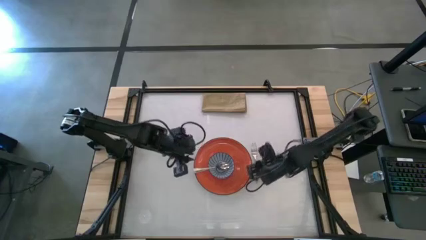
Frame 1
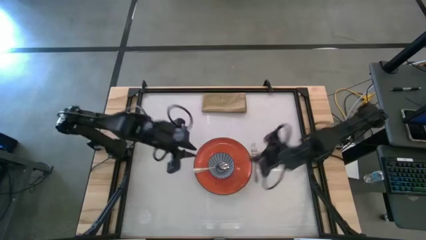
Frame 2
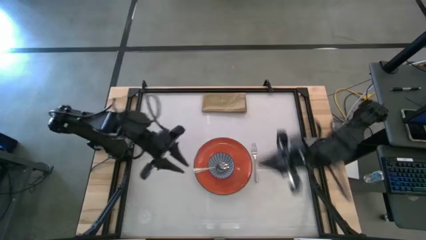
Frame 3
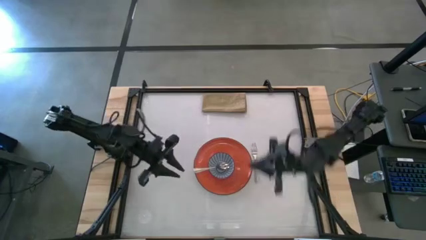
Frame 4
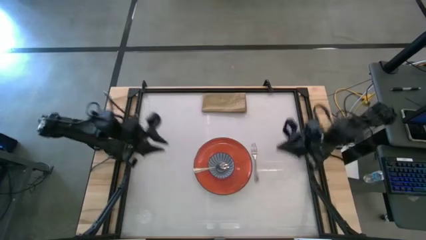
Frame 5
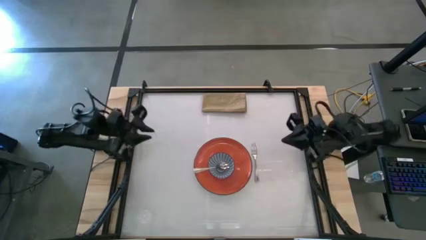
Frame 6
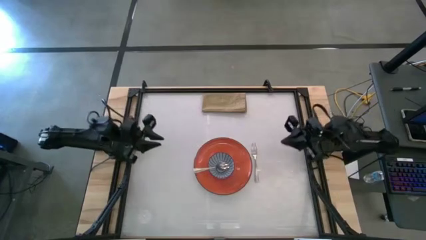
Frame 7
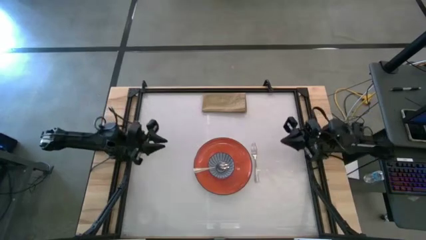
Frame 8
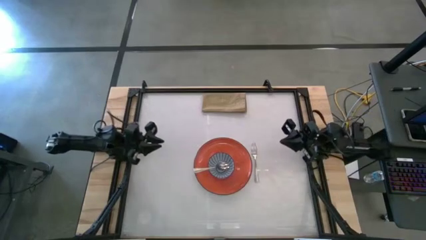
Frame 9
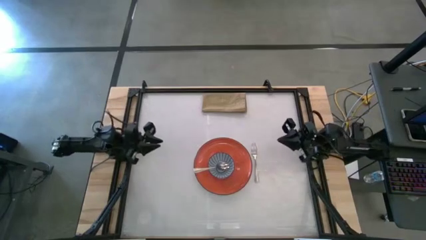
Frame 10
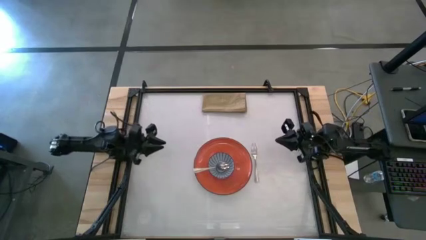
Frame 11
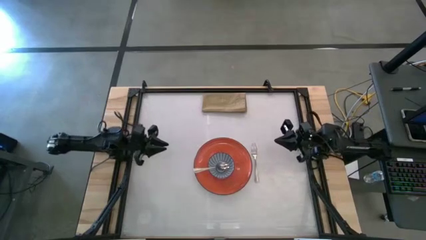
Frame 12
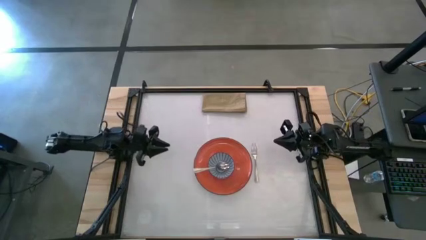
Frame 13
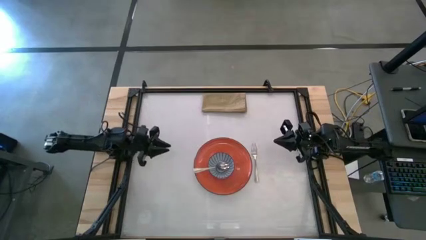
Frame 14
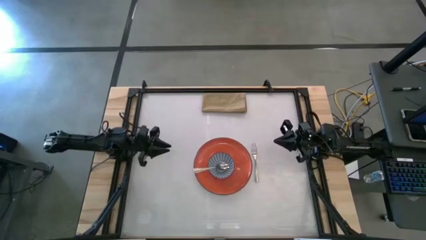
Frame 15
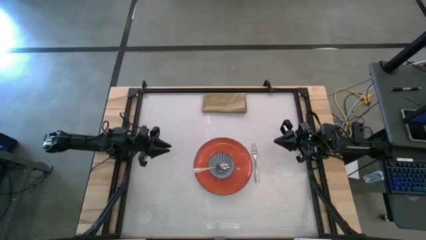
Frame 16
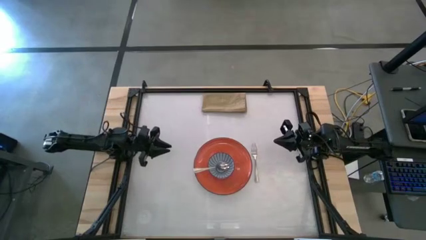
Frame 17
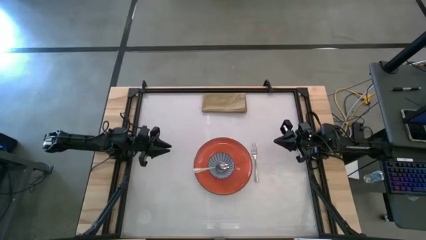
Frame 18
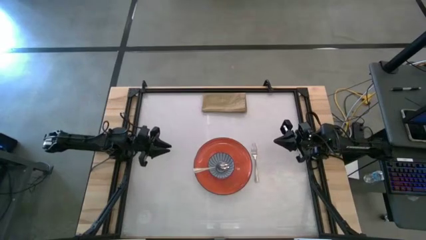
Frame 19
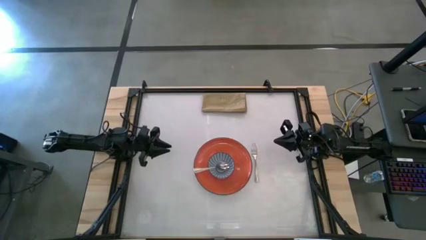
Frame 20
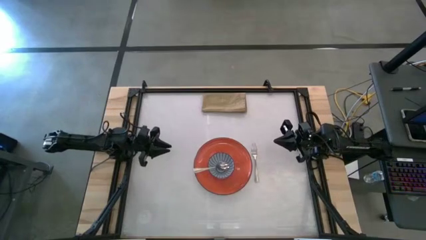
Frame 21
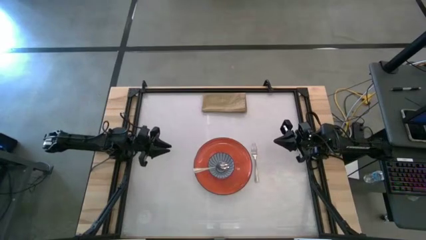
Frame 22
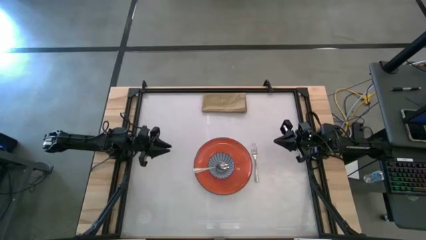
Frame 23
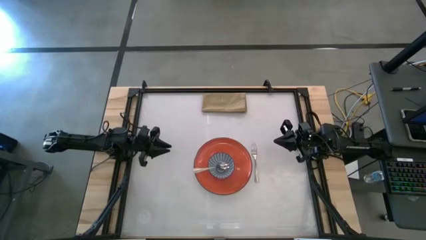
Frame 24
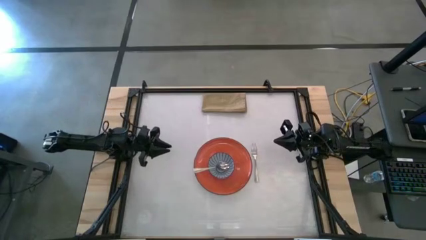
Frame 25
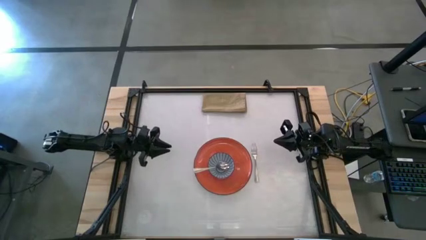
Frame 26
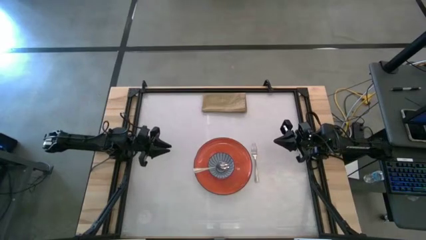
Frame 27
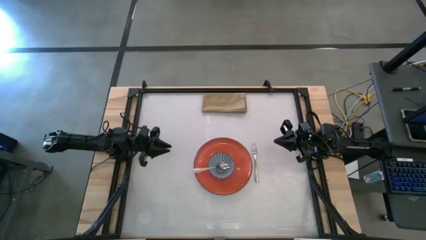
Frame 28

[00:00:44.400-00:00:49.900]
Task: Set table place
Return to Home Position

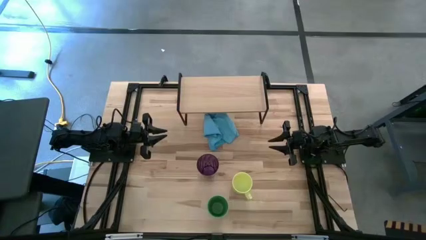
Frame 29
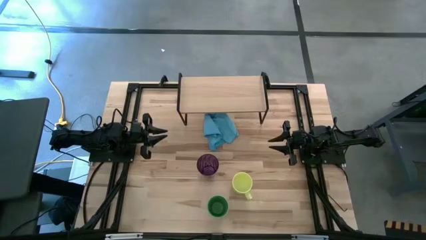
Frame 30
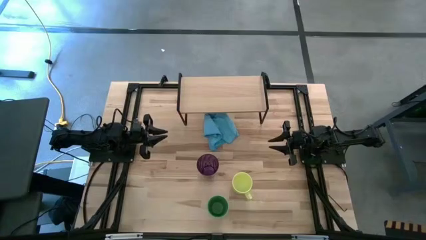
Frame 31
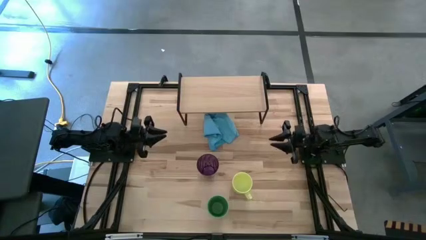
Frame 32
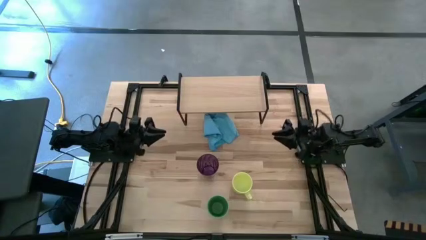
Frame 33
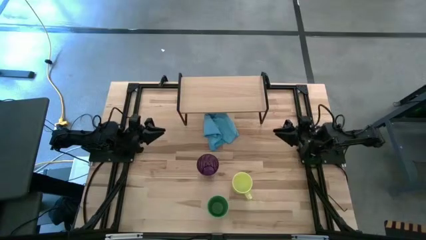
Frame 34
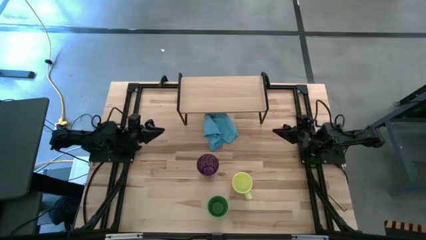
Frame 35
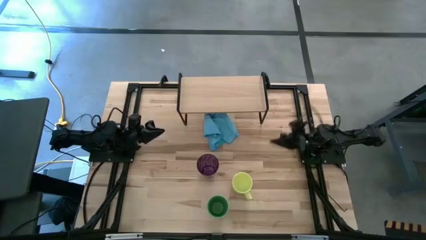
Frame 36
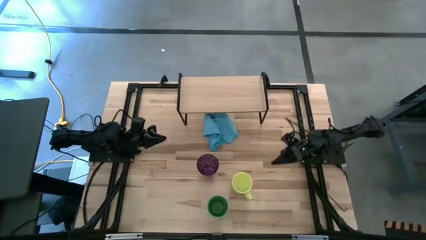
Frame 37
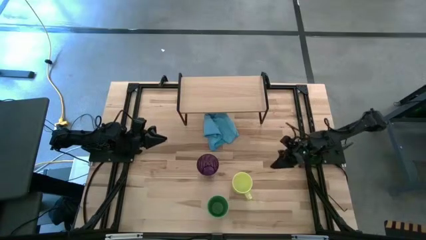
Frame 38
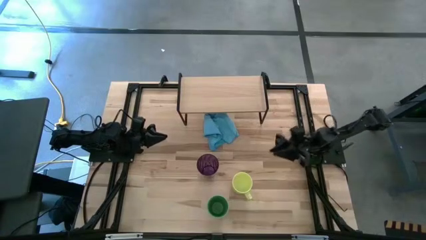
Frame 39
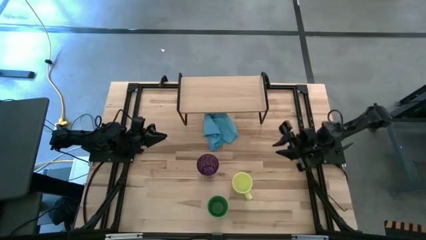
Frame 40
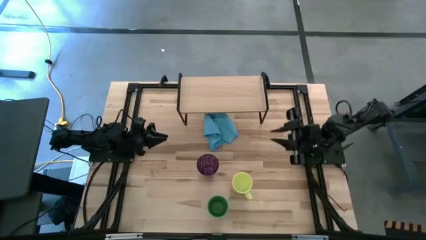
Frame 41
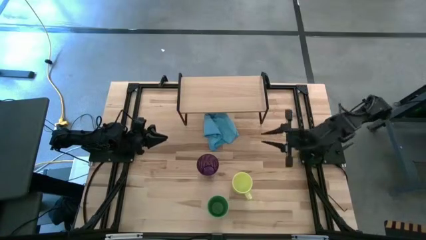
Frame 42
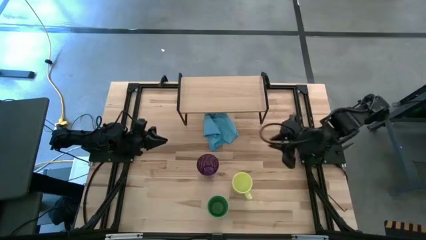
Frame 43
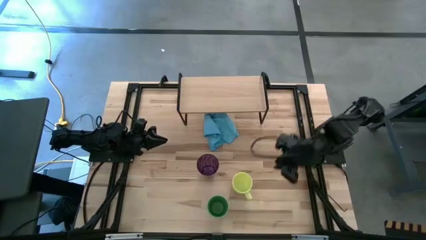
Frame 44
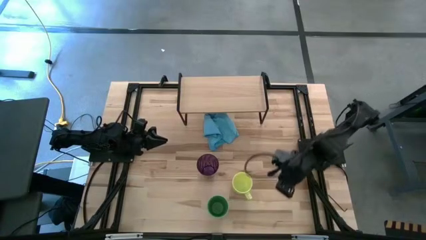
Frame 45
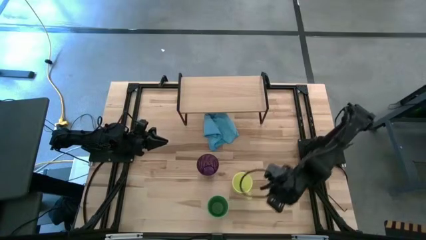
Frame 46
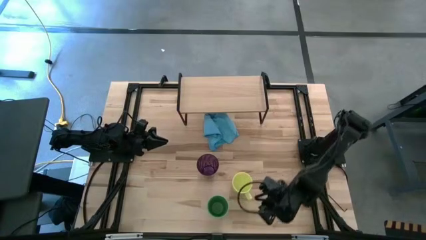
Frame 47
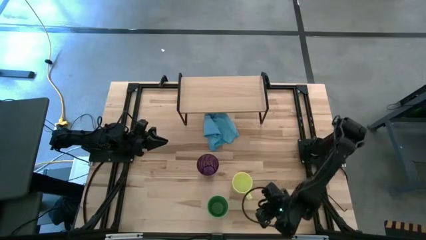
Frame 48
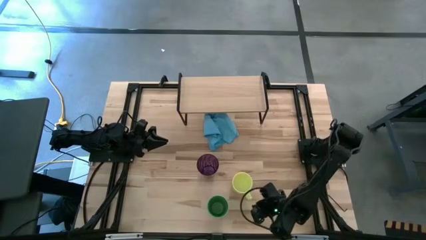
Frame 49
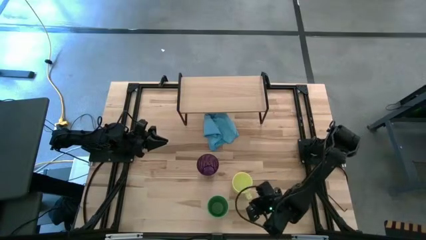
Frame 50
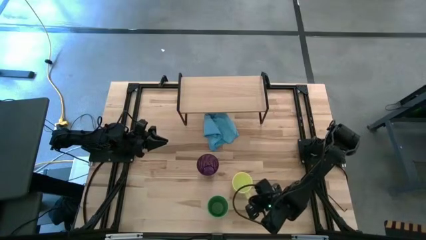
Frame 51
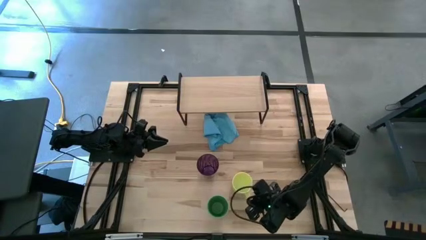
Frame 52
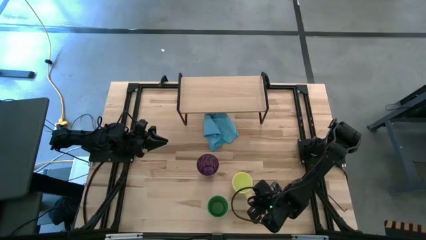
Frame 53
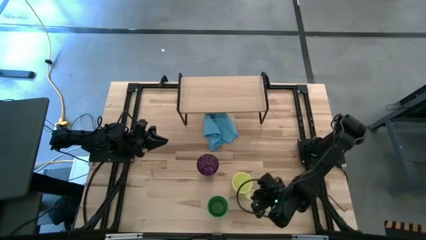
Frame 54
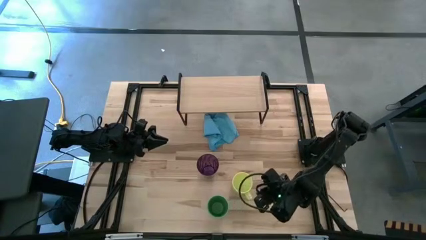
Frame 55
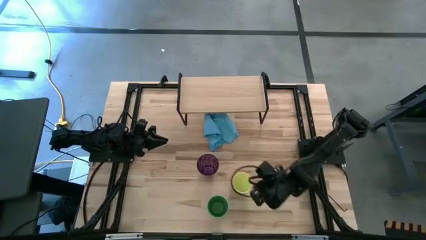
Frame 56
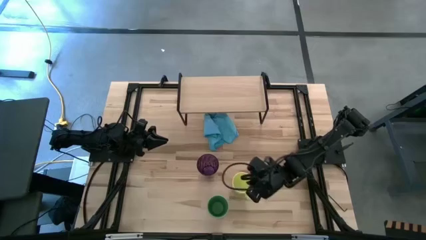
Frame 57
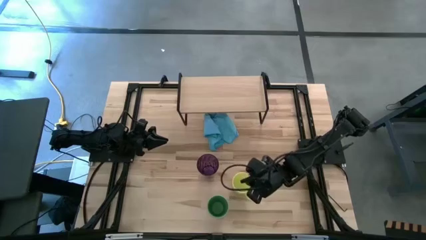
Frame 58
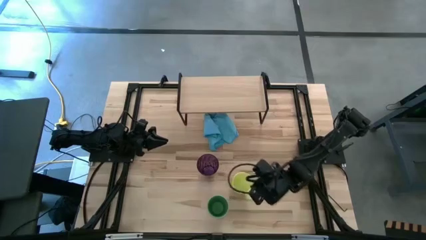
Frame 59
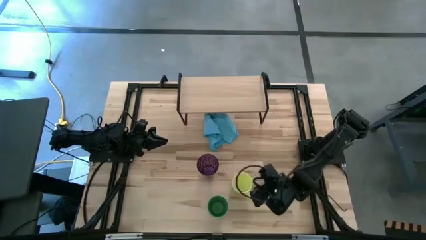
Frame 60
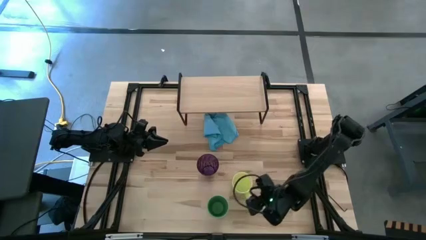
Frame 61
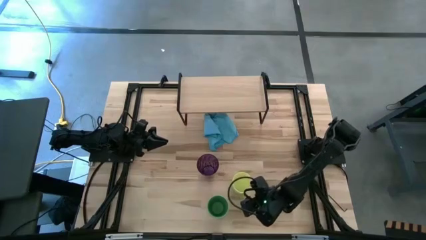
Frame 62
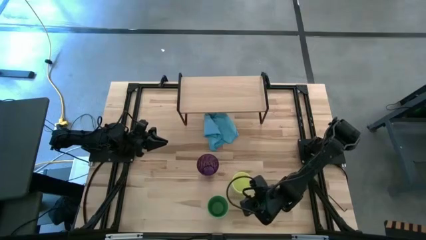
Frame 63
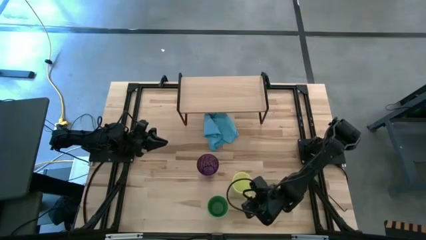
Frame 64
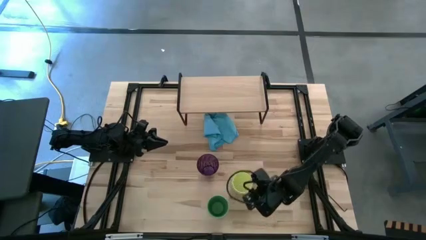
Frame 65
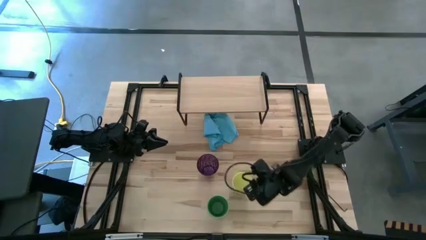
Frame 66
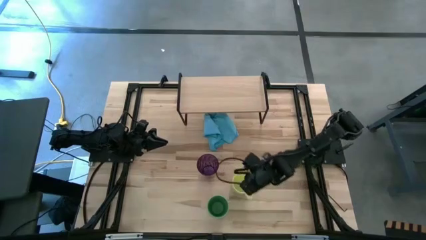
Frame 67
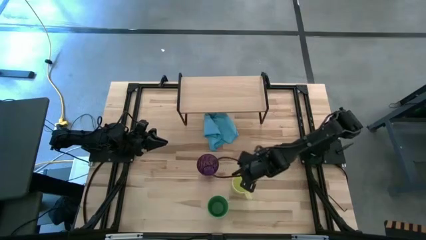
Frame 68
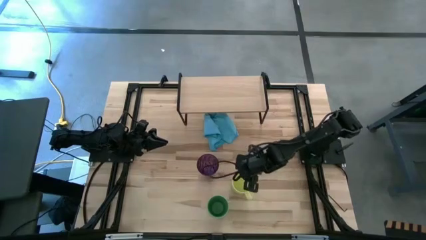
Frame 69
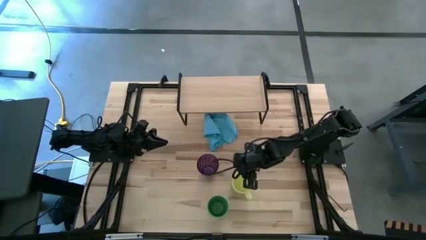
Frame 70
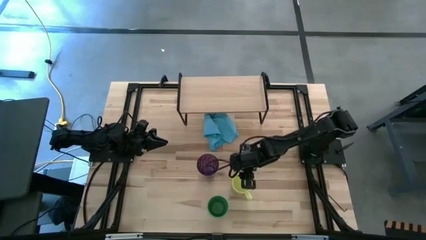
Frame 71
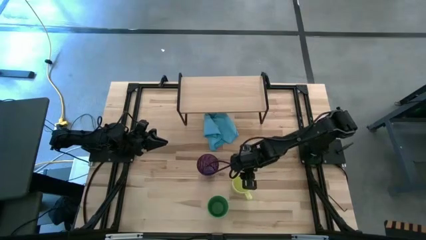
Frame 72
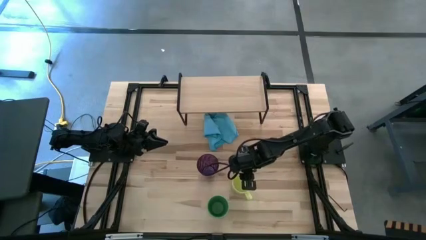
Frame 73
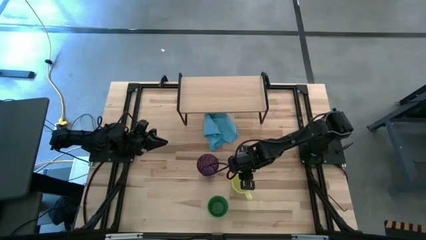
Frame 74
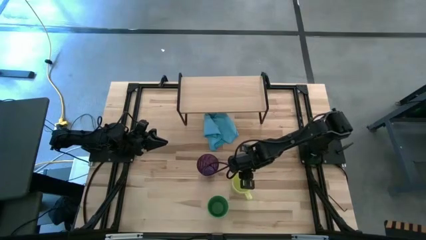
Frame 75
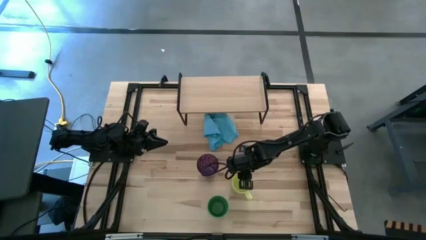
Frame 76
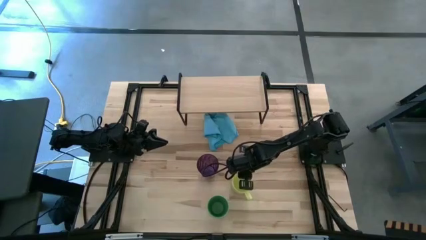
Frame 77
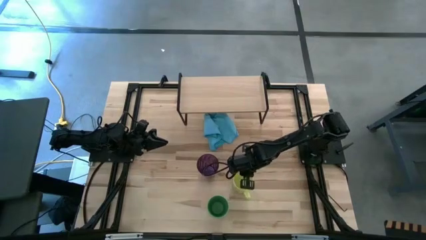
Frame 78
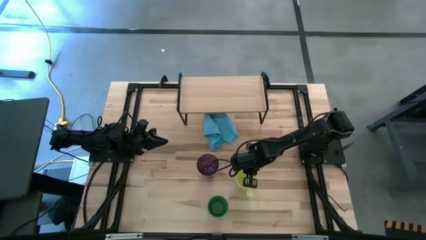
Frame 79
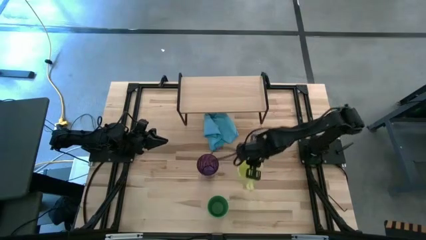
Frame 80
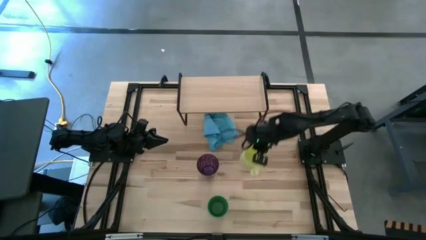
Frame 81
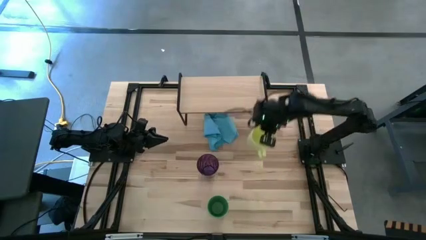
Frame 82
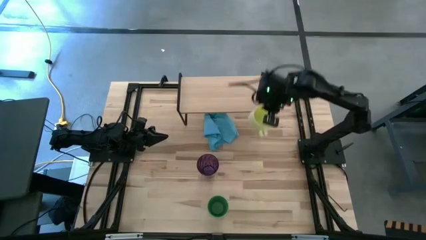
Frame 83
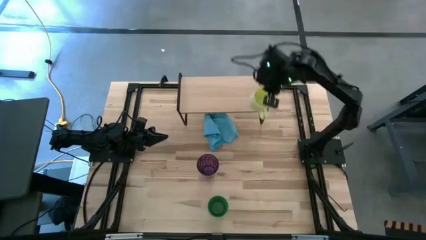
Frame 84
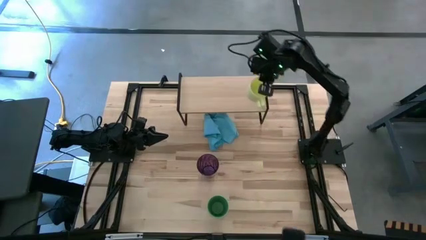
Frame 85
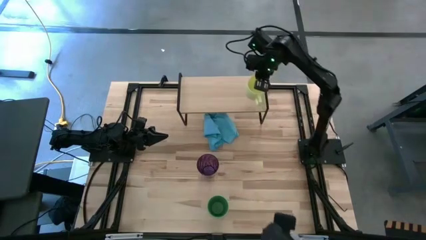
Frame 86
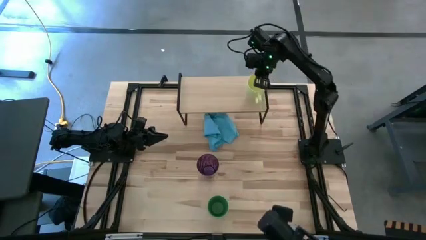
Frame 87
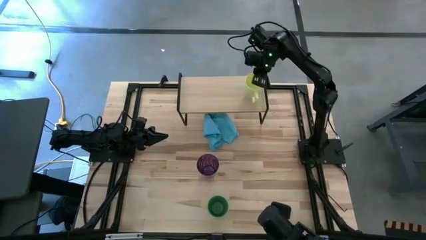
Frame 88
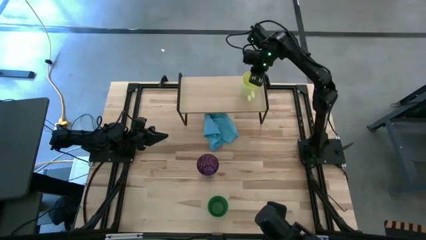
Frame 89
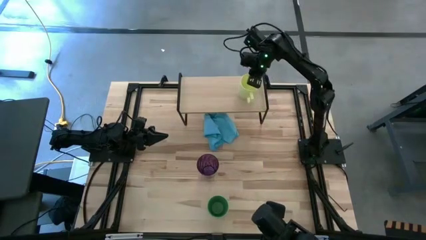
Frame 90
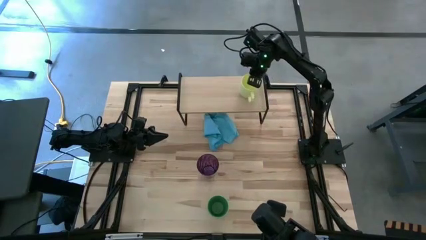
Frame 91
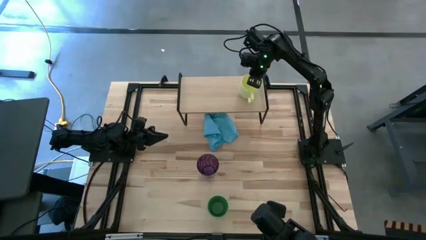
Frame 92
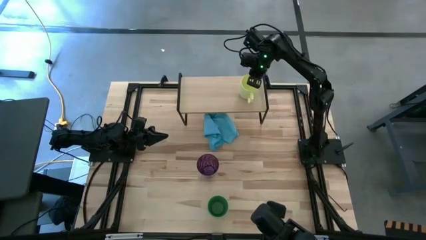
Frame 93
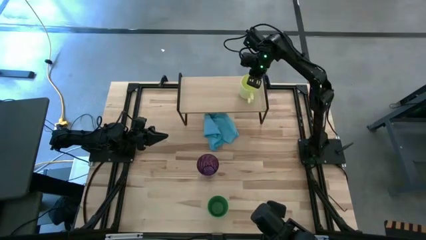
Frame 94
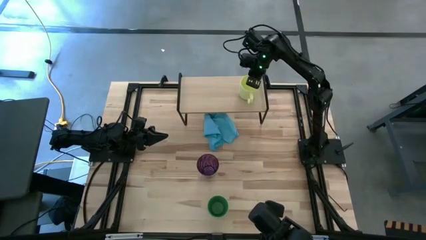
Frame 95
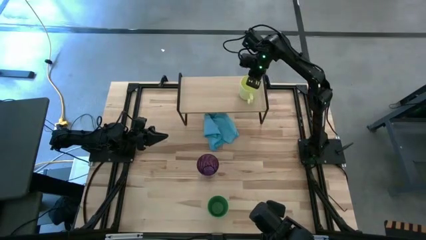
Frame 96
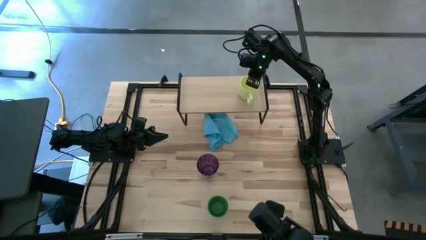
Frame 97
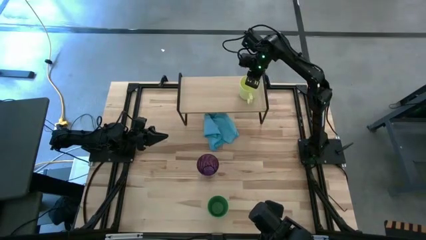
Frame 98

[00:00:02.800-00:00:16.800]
Task: Stack small to large cups/mugs on shelf
Put the light green mug on the shelf
